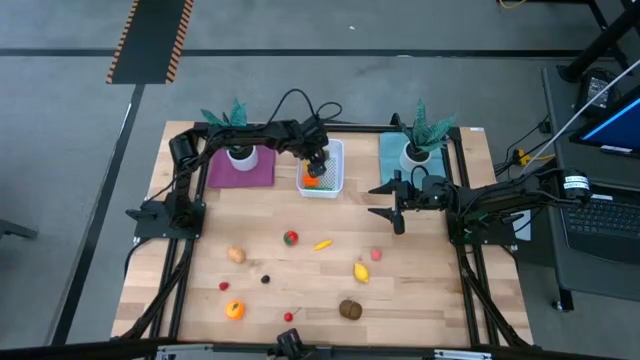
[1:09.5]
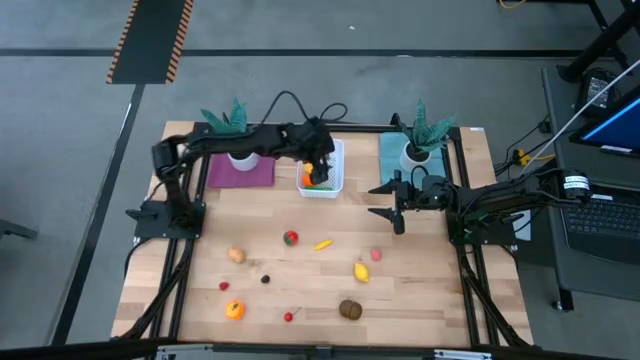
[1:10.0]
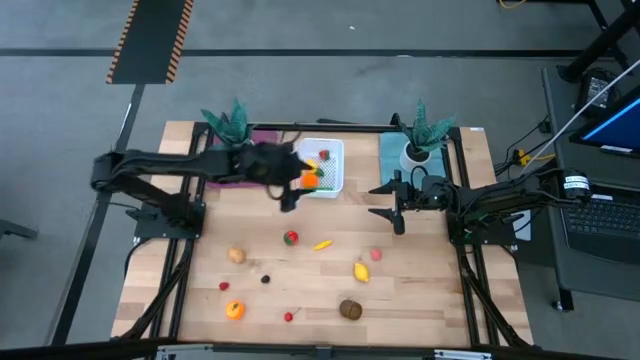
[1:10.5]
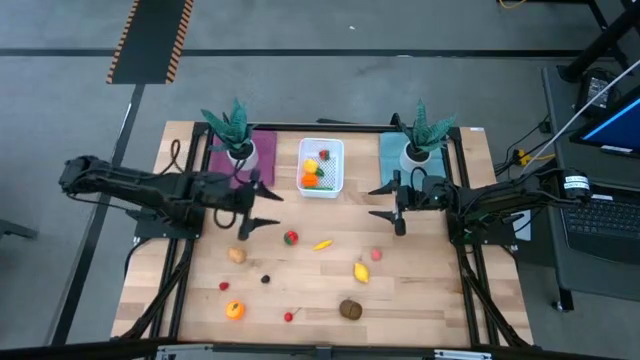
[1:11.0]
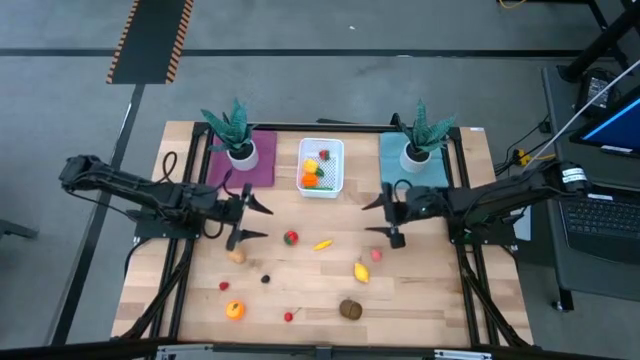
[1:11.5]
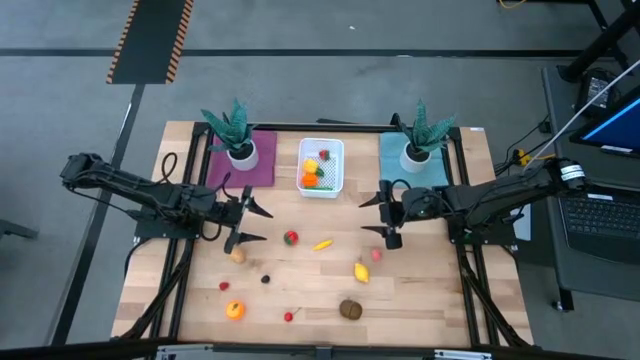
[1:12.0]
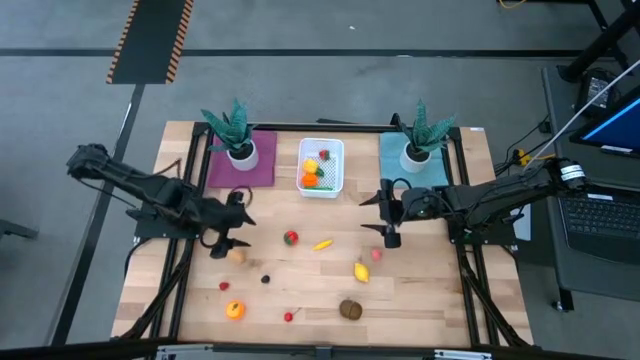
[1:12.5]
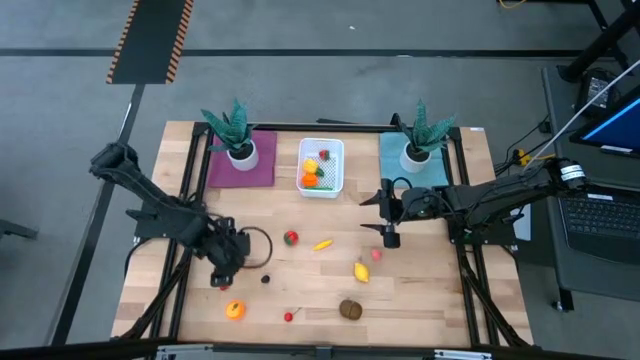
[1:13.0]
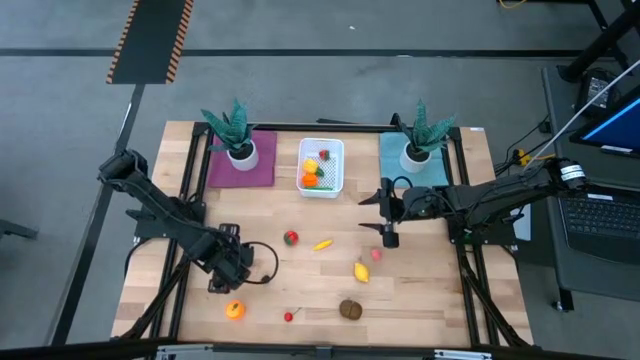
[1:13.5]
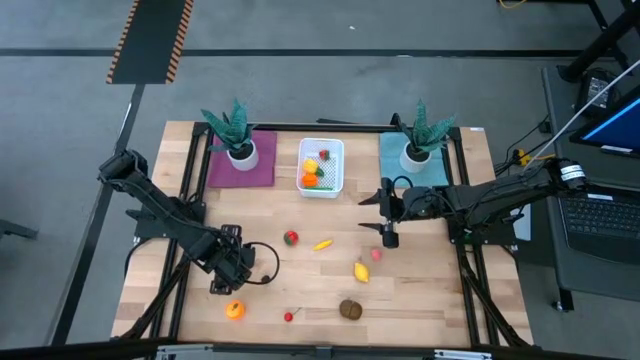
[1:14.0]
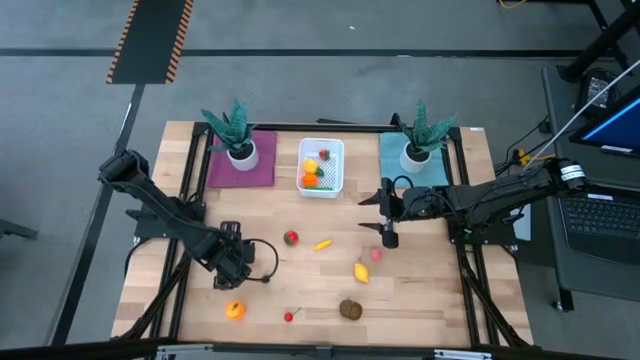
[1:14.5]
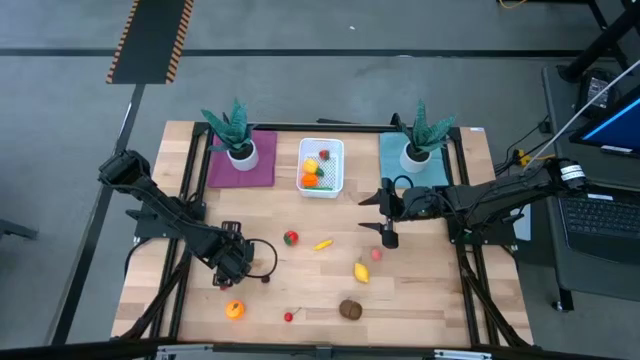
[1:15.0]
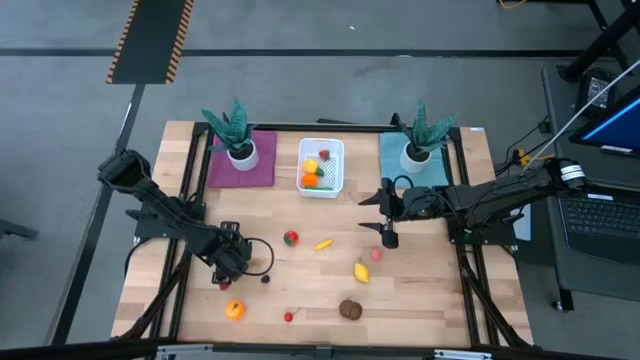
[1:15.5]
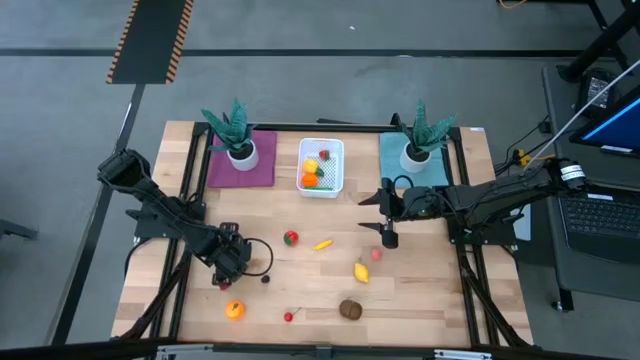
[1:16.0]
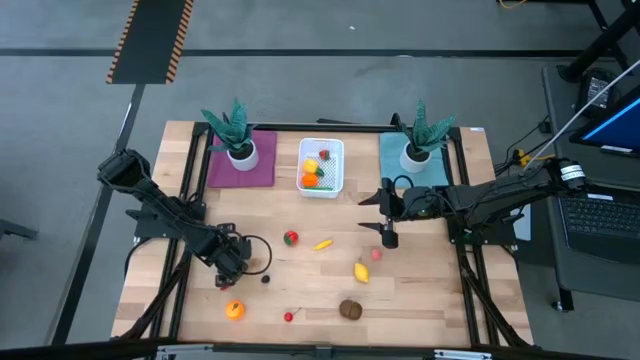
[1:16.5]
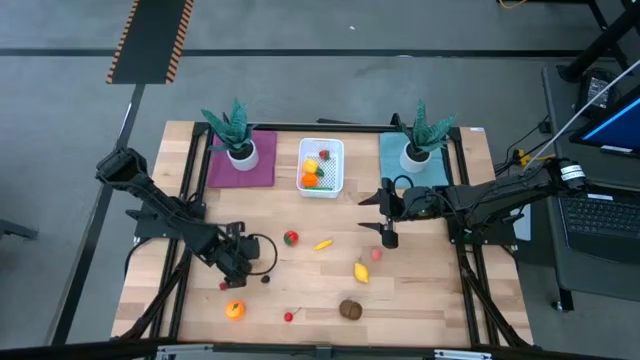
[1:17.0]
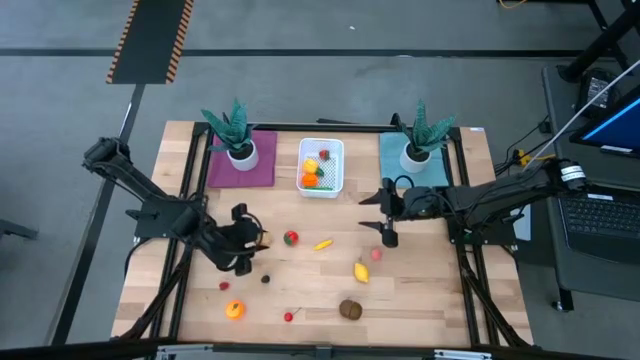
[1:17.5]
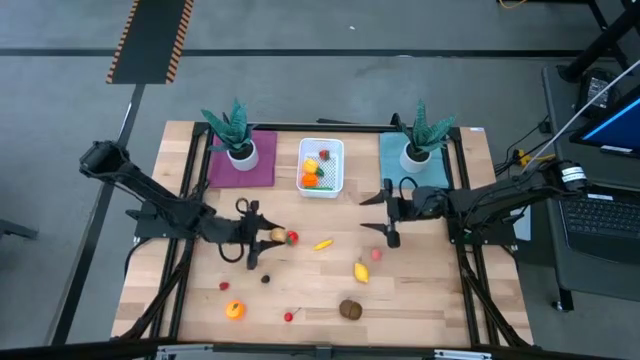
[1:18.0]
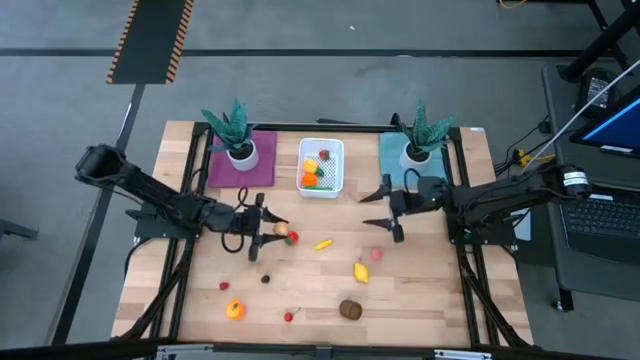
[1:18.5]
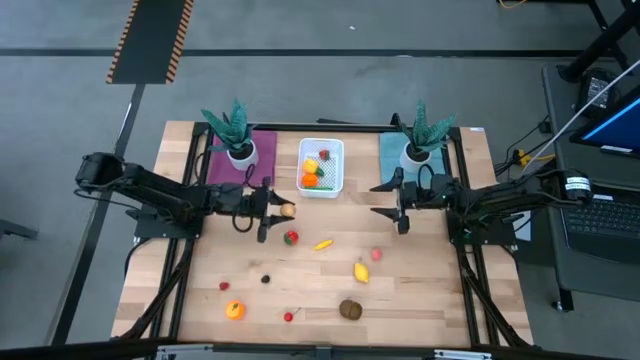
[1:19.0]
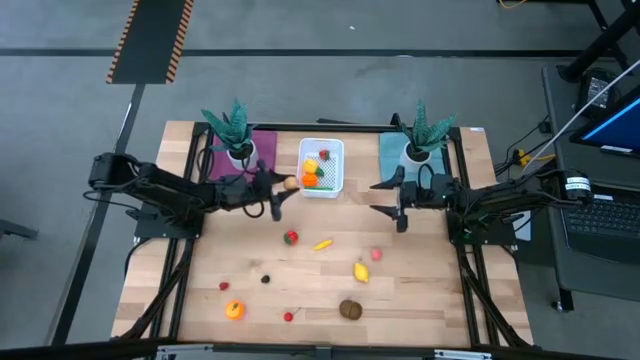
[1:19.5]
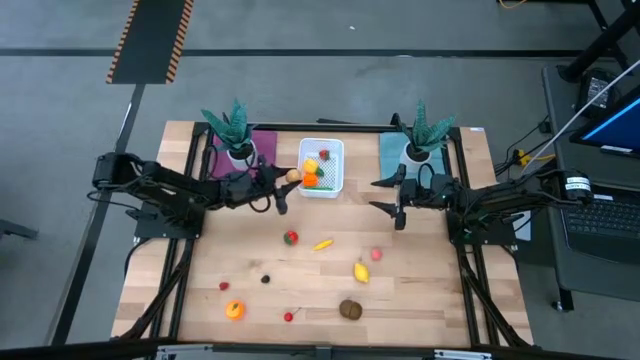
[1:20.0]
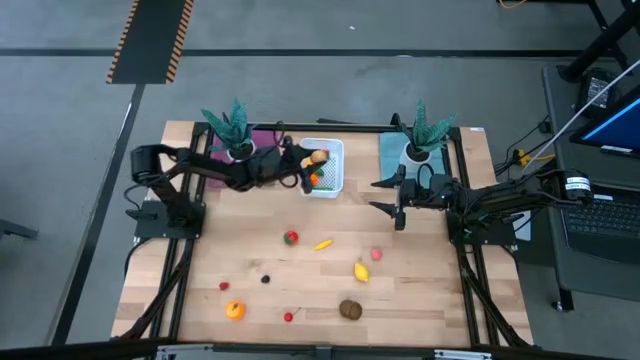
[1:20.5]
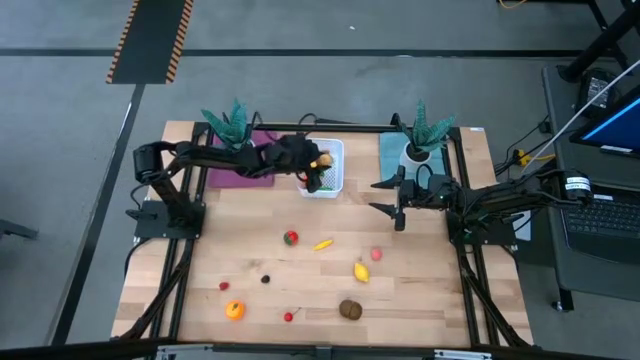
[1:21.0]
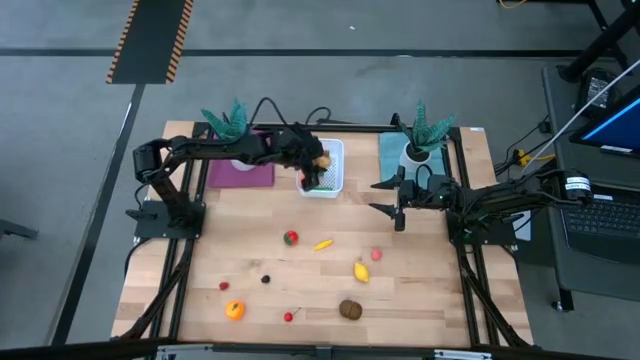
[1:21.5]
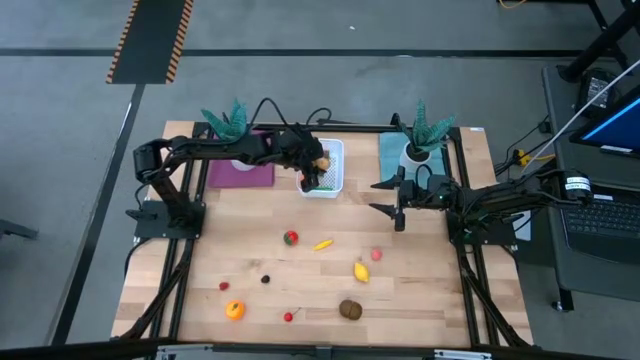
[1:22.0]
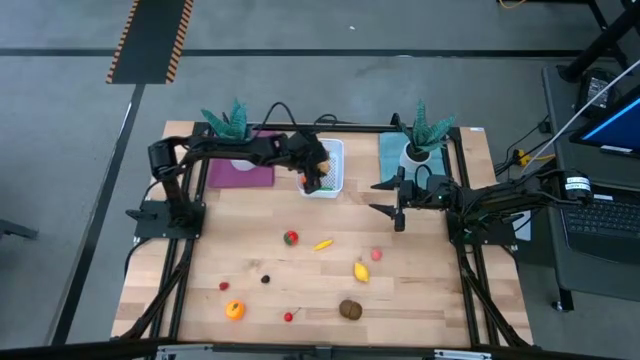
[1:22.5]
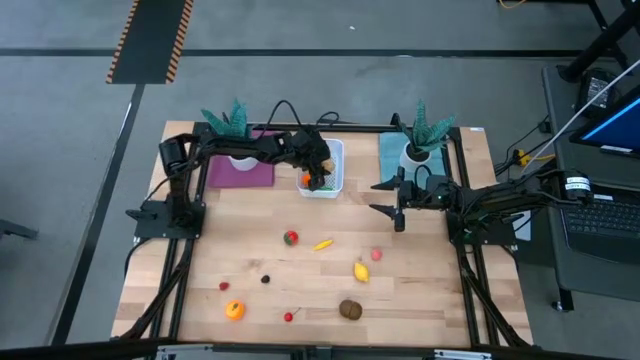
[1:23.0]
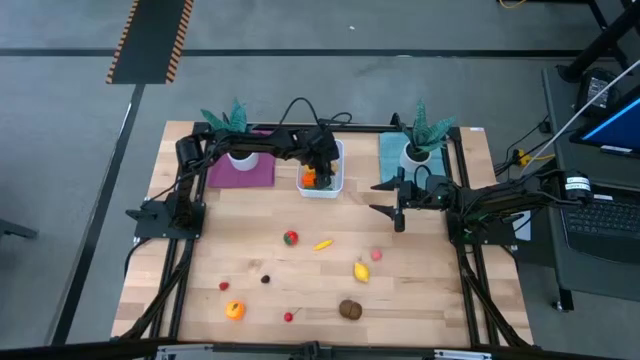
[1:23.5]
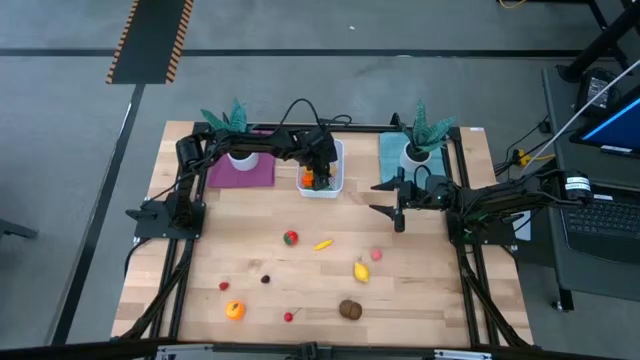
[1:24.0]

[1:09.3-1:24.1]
Task: Pick and placing Produce into tupperware
Put the brown potato into the white bin

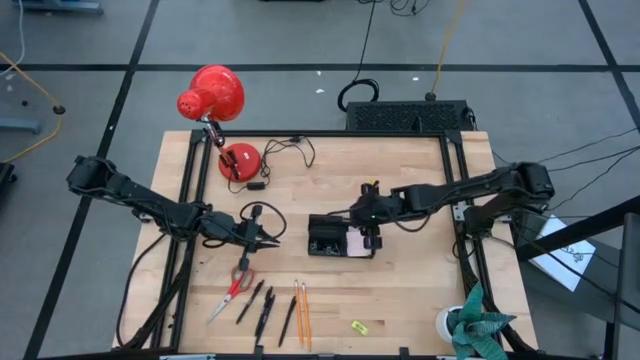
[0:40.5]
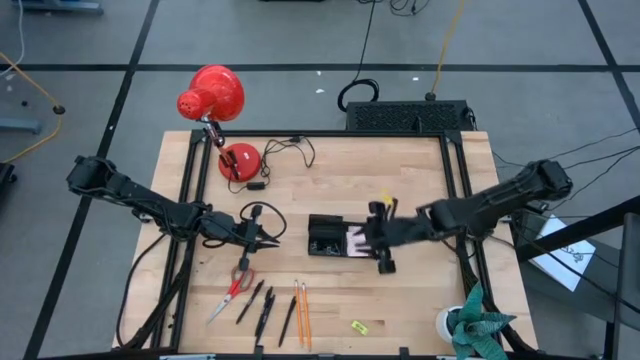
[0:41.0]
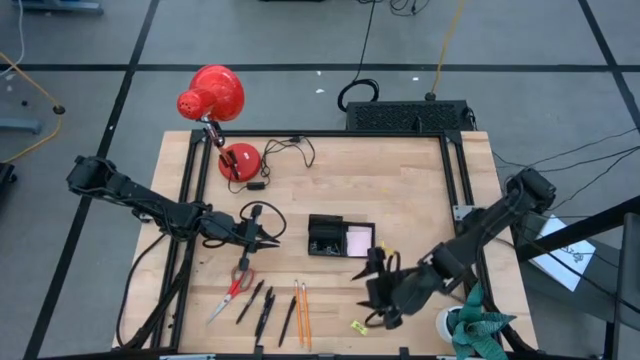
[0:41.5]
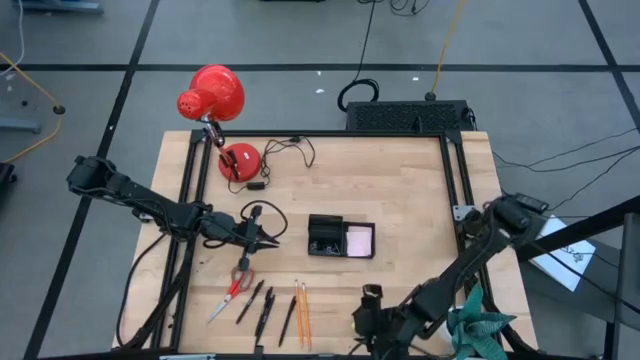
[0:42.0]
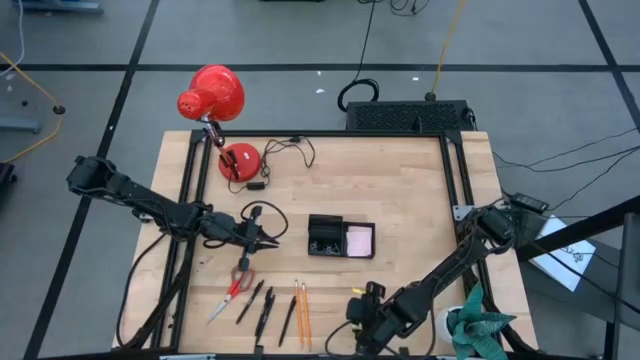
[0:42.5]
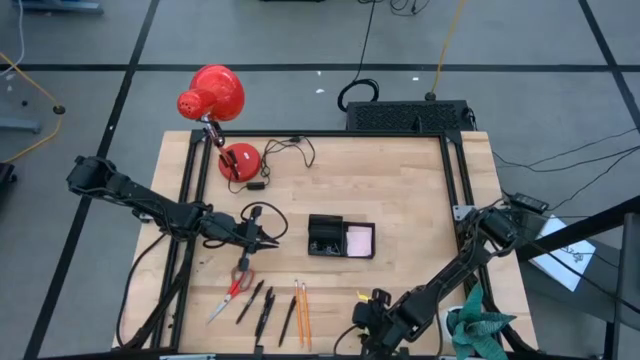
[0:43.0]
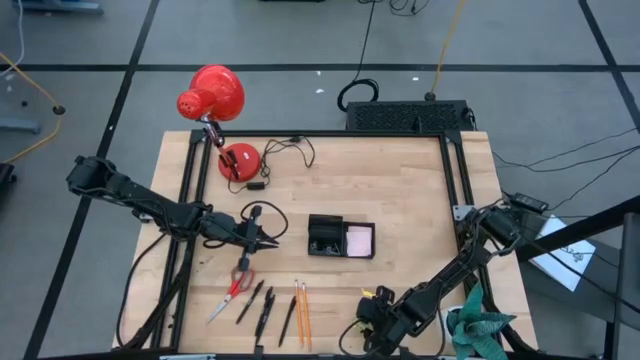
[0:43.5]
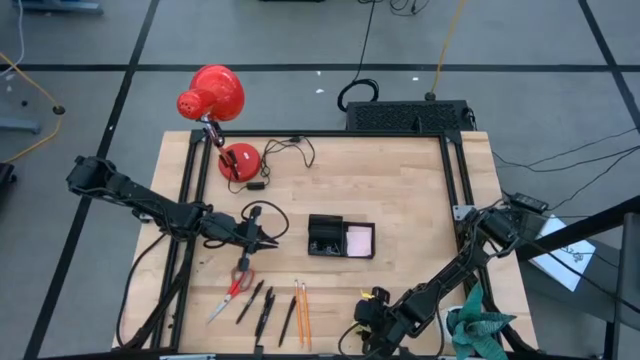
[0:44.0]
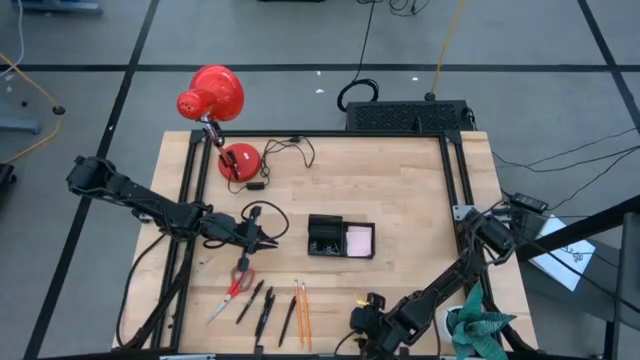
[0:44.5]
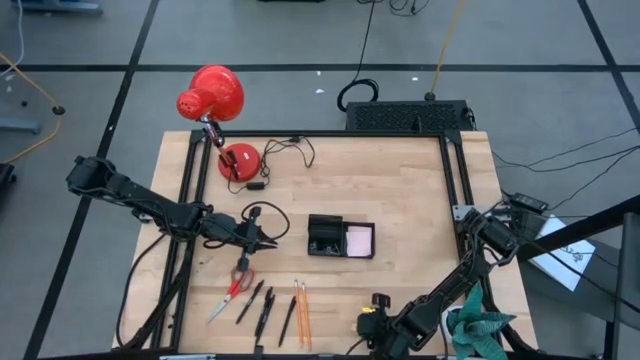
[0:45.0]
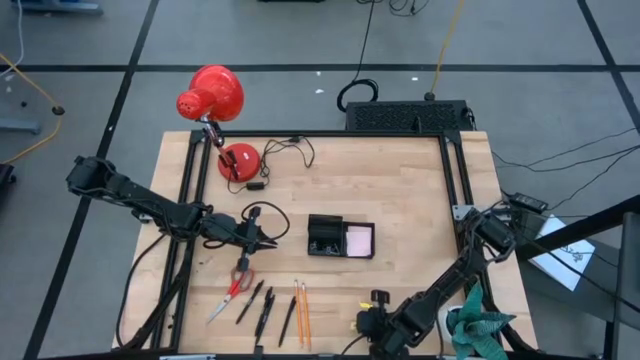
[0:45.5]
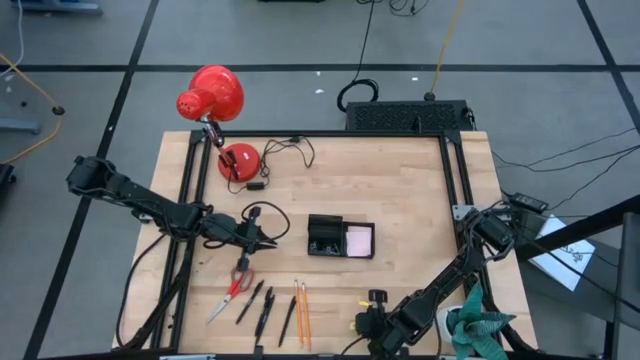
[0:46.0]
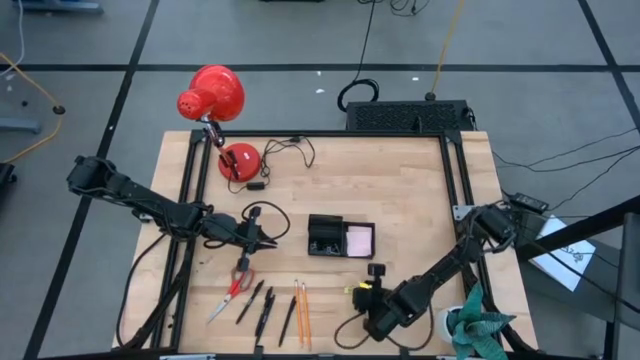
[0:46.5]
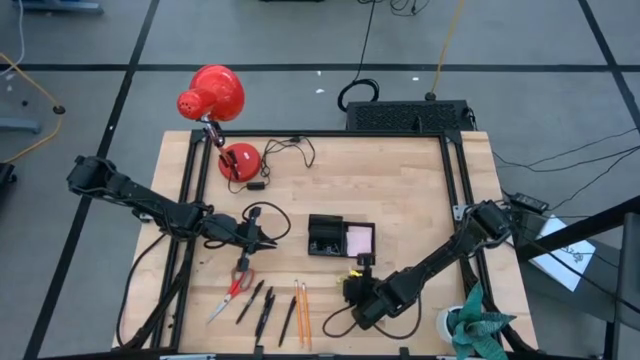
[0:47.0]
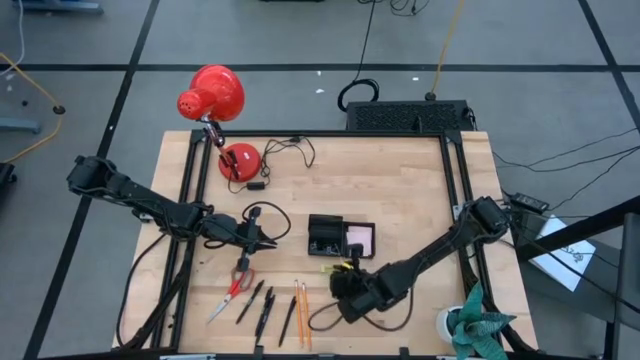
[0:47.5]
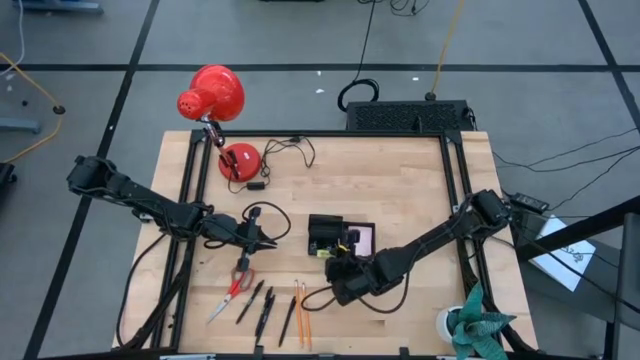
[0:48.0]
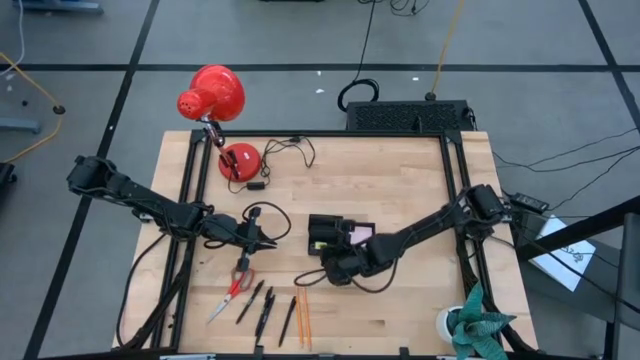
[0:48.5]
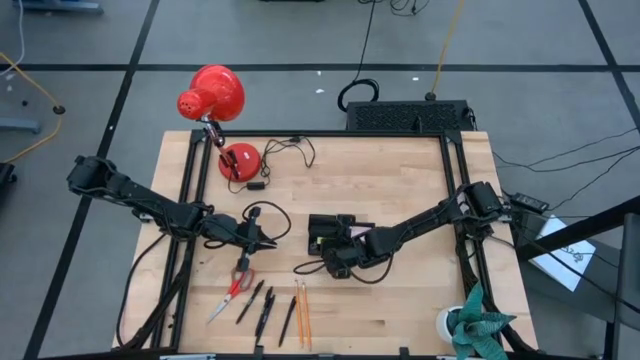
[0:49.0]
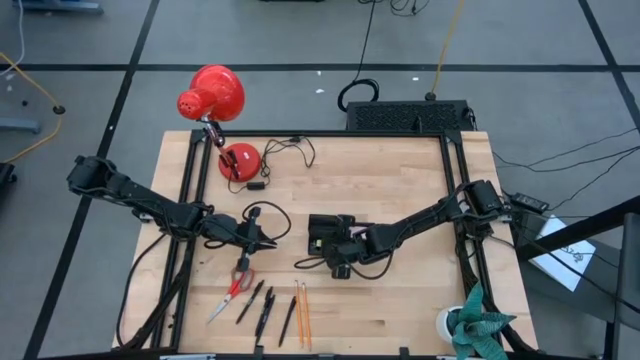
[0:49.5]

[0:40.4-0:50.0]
Task: Pick and place office supplies into organizer
Put the green eraser into the black desk organizer
